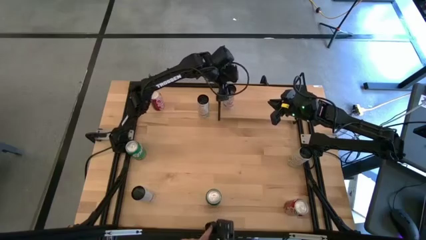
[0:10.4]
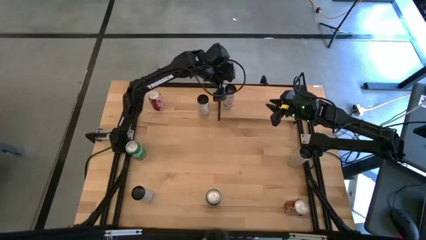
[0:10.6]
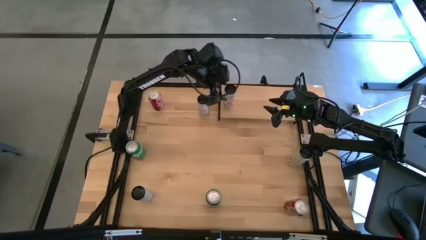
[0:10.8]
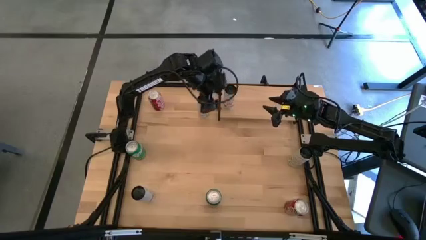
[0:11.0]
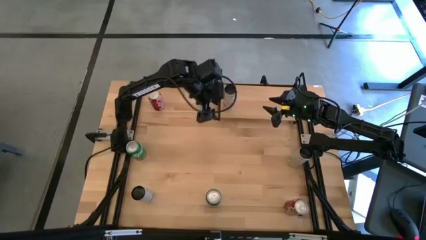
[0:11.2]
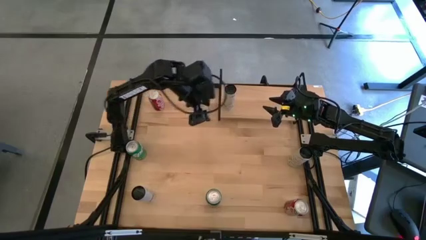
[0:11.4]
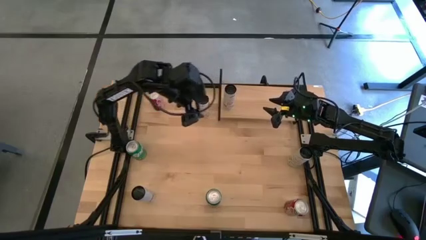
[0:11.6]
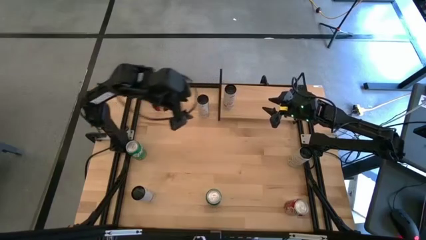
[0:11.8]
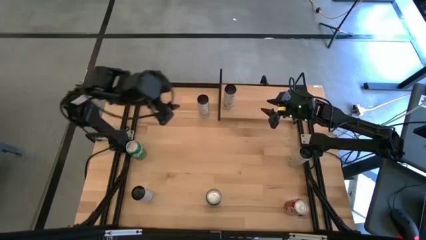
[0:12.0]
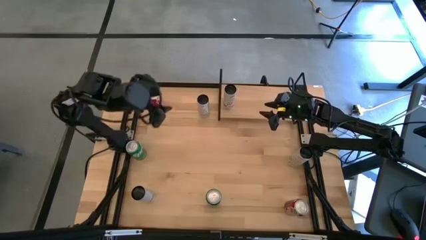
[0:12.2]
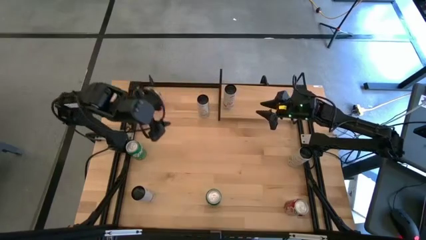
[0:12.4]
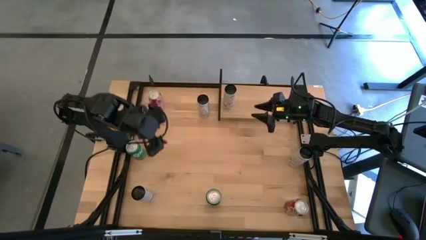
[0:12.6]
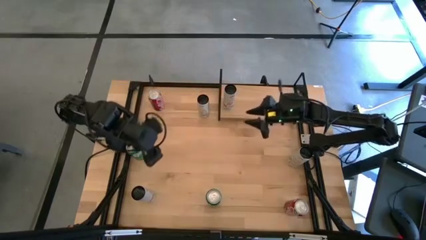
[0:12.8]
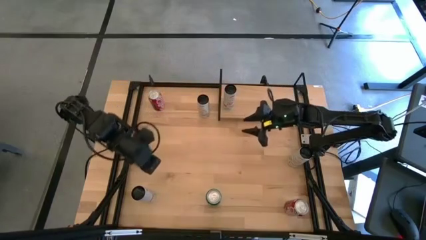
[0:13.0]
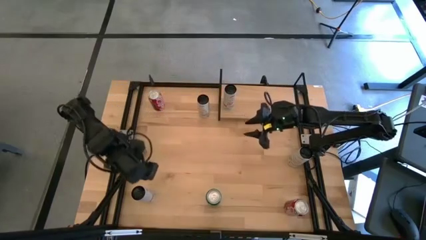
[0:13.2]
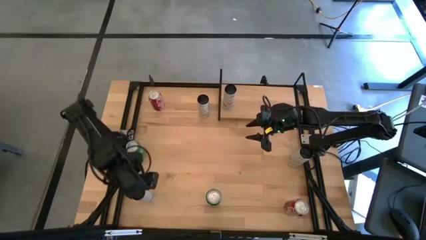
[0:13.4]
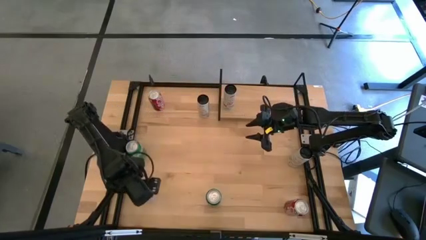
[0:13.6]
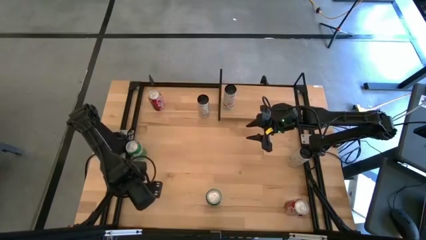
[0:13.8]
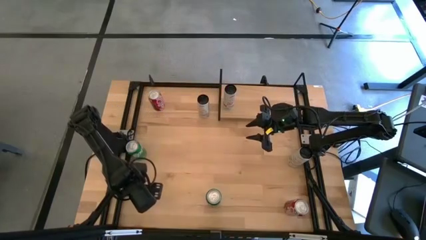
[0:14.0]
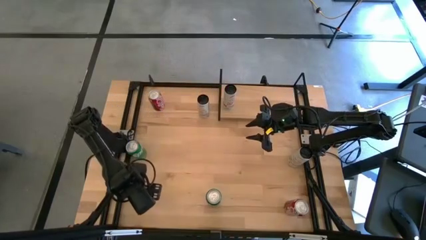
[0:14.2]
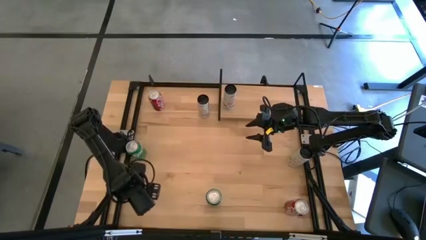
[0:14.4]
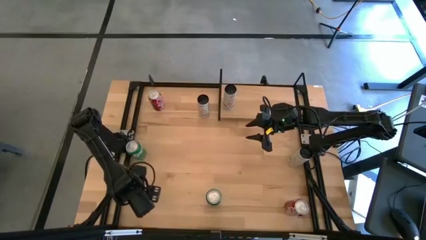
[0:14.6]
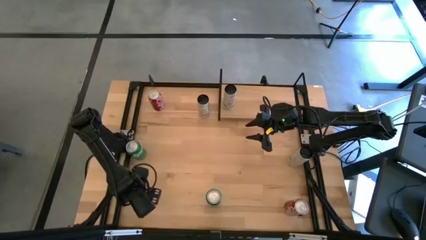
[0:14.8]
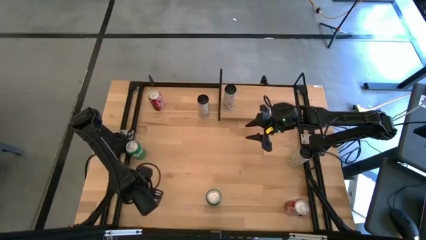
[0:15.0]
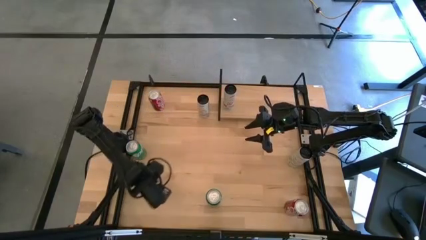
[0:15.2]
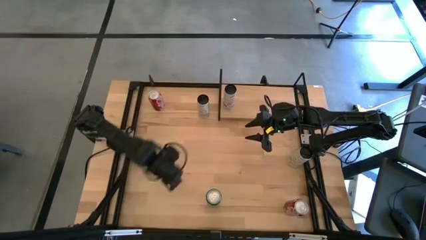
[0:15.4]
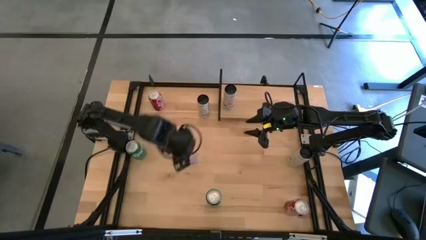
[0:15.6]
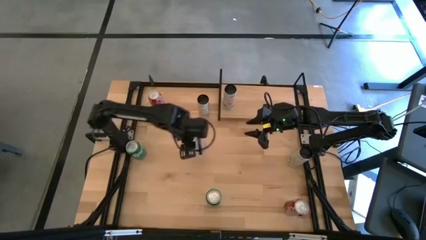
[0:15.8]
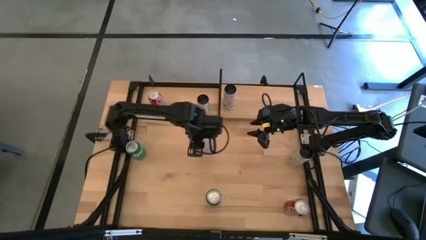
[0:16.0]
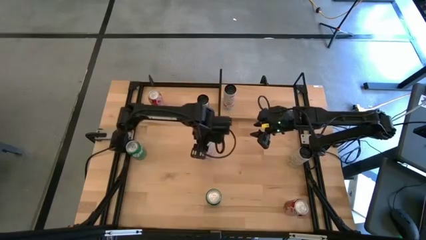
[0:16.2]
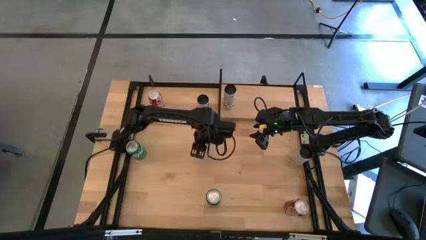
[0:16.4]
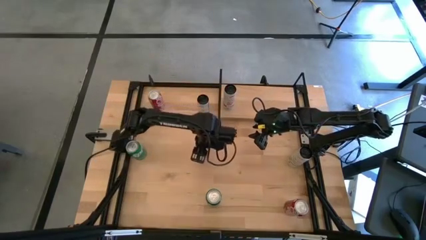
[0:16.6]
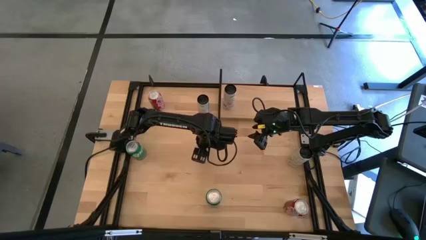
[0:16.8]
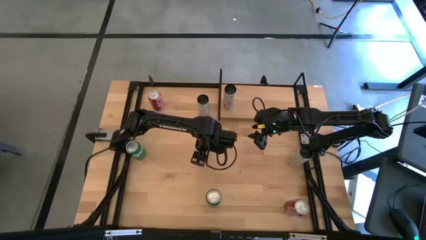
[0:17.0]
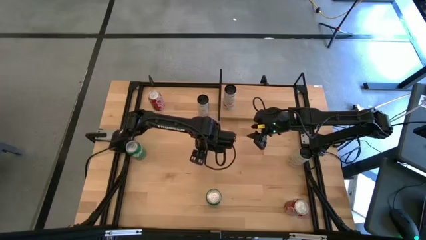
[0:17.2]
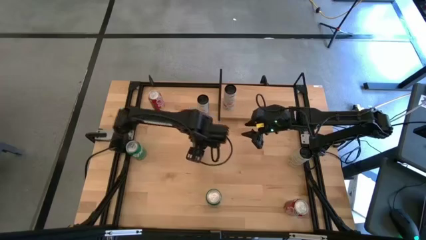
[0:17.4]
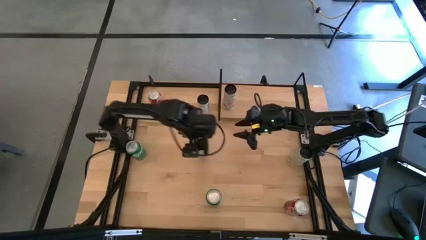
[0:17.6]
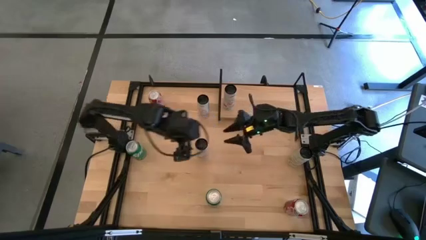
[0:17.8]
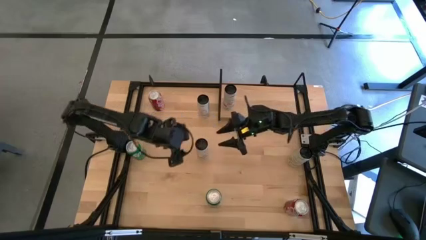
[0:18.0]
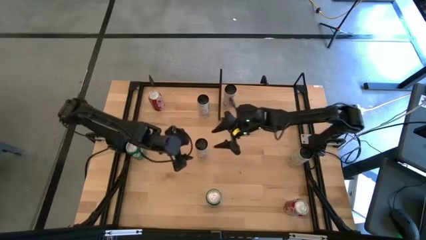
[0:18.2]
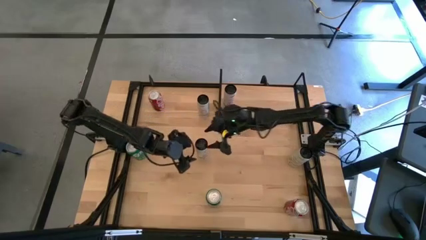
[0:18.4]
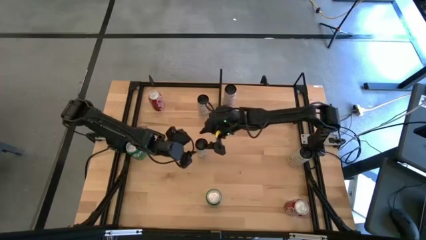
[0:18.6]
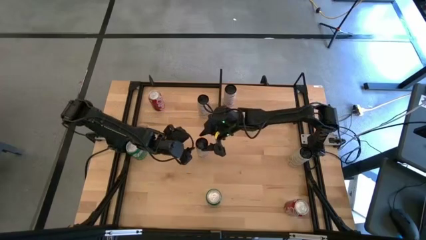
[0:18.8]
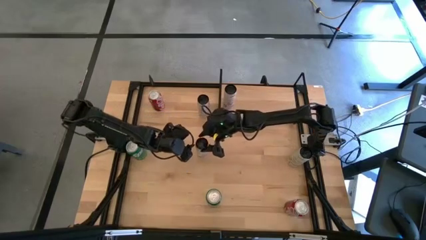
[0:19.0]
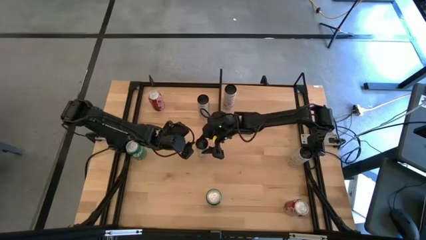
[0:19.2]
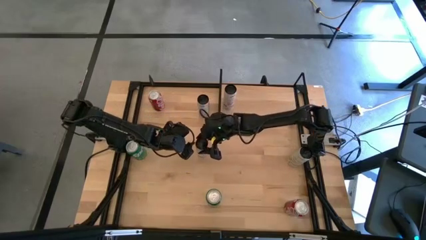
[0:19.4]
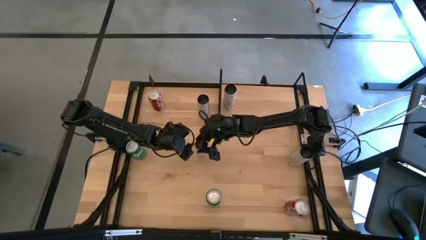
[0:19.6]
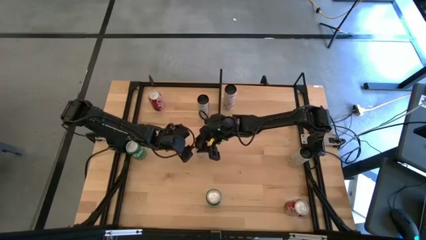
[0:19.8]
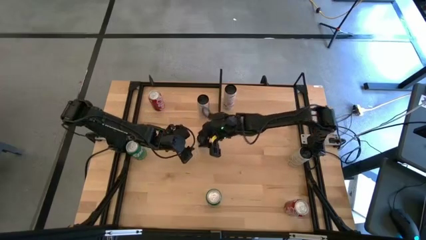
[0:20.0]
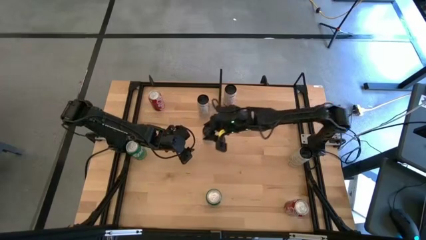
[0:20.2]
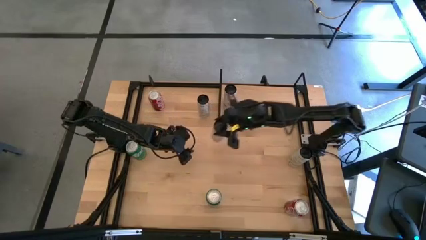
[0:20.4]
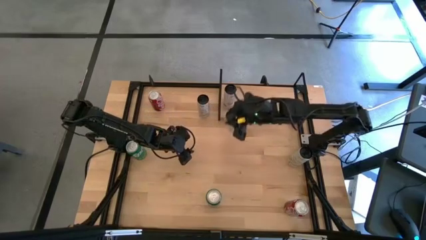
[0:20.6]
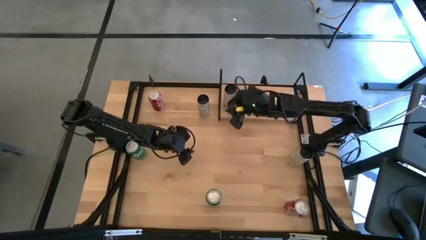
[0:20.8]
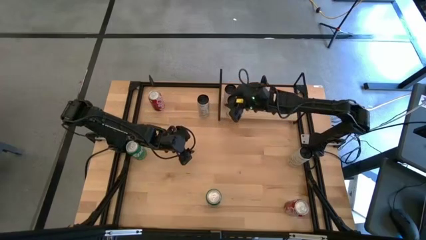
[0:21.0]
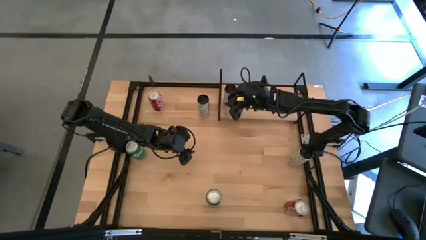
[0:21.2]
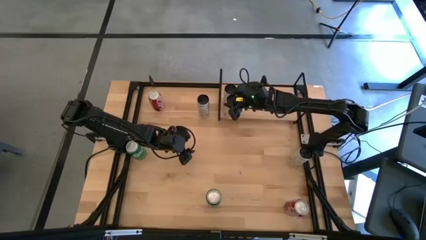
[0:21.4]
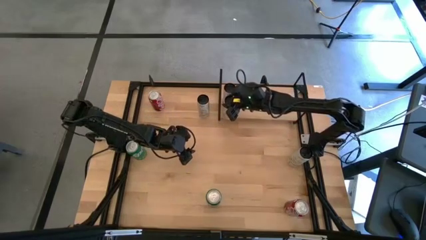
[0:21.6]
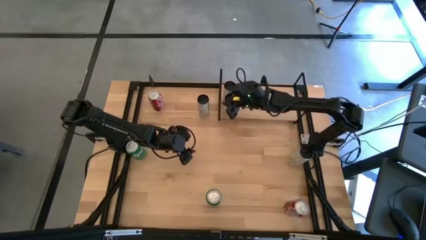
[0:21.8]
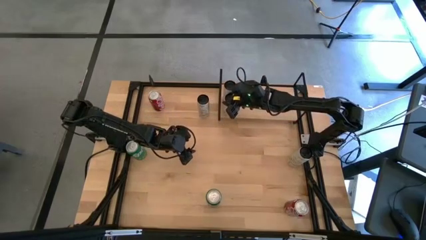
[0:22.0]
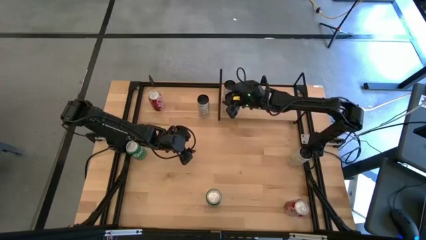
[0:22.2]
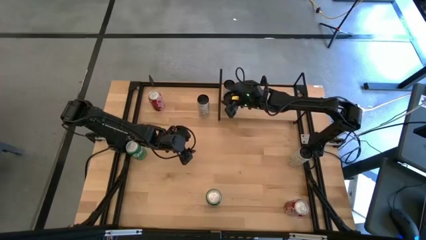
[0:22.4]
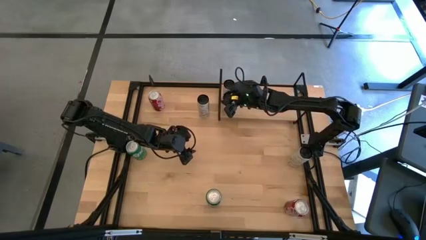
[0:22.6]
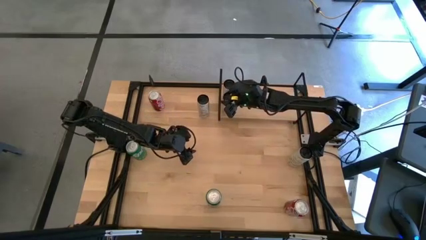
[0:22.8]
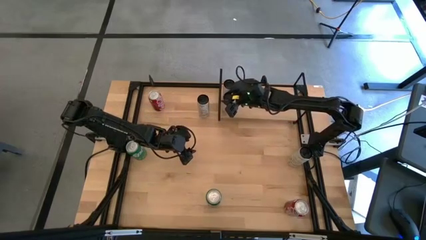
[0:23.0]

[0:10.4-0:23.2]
Task: Place canned beverage on shelf
Put the white-pink soda can on the shelf aligned with the other white-pink soda can

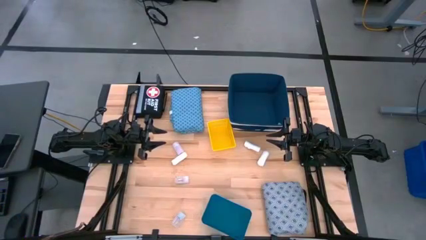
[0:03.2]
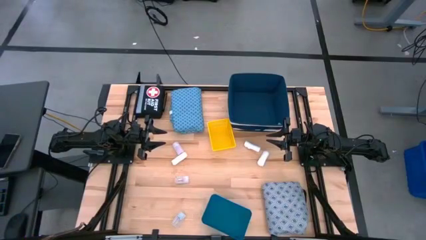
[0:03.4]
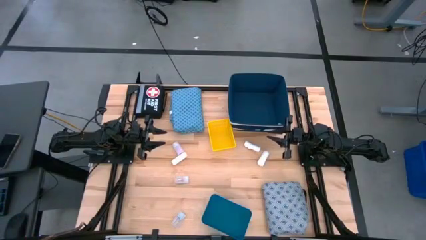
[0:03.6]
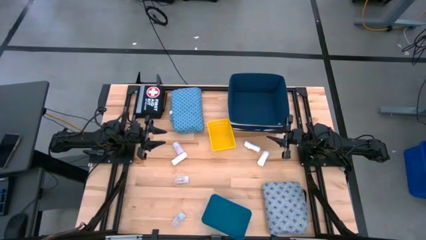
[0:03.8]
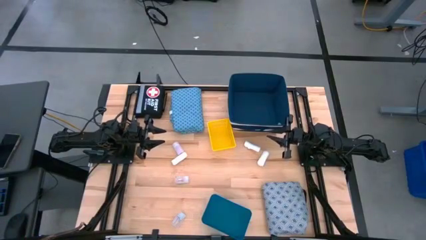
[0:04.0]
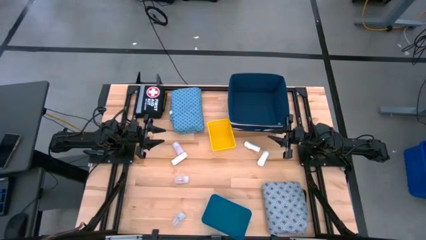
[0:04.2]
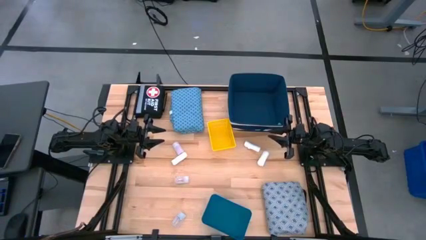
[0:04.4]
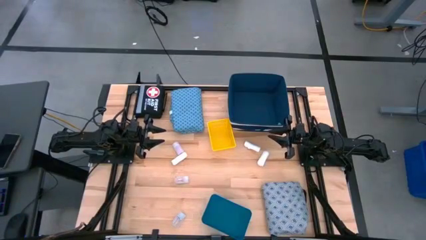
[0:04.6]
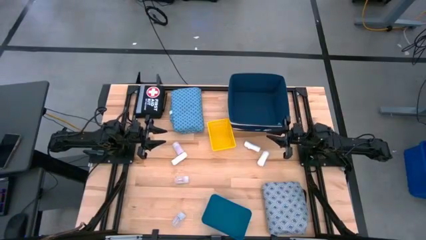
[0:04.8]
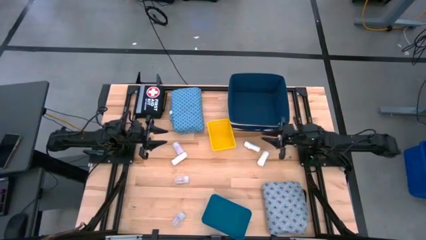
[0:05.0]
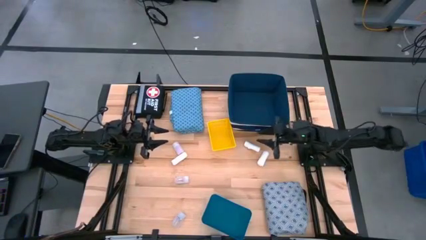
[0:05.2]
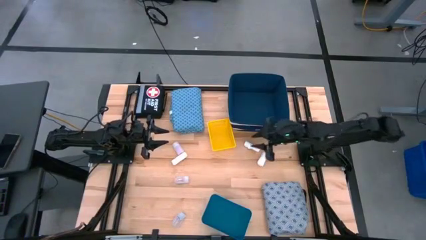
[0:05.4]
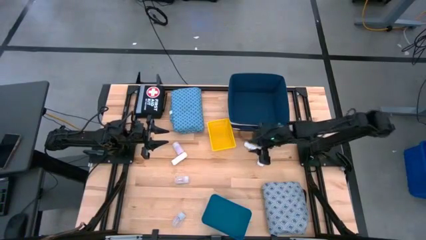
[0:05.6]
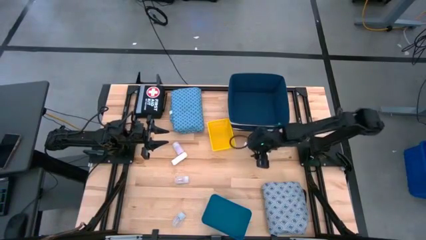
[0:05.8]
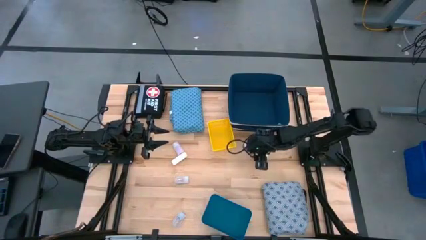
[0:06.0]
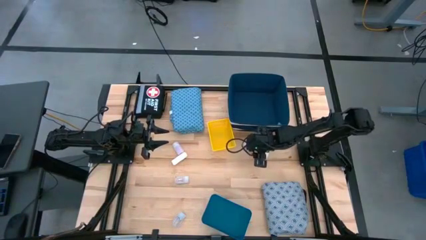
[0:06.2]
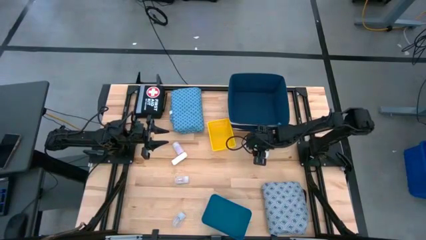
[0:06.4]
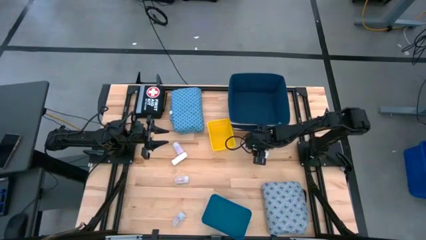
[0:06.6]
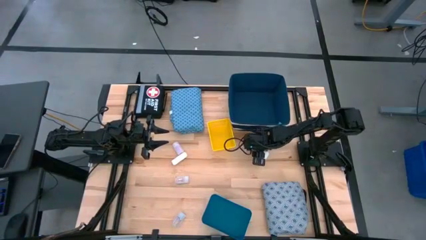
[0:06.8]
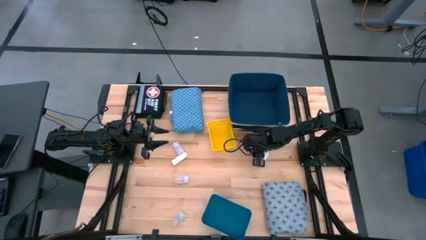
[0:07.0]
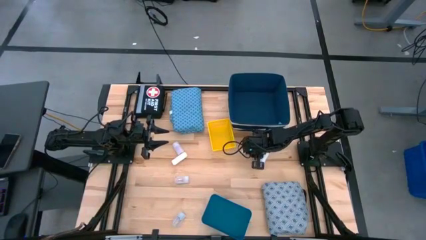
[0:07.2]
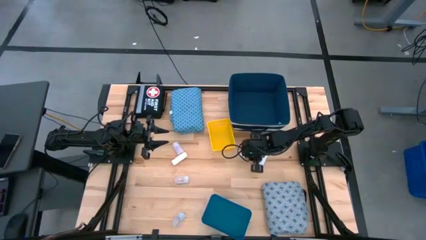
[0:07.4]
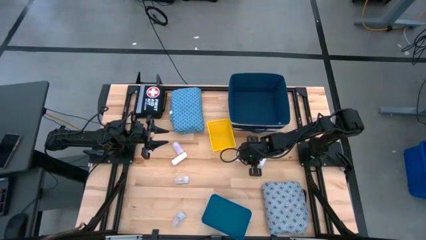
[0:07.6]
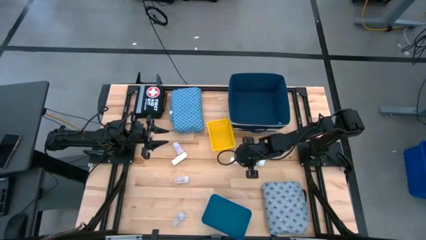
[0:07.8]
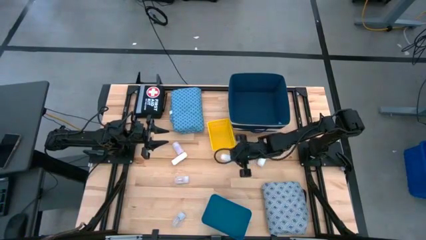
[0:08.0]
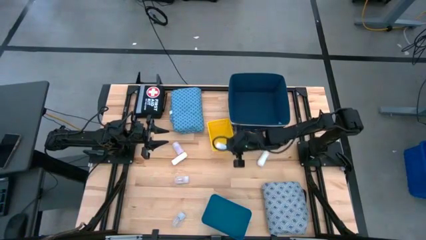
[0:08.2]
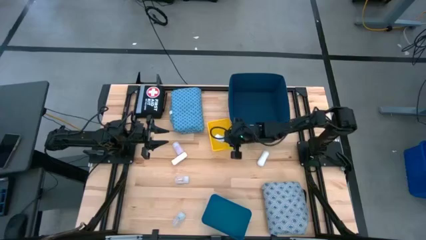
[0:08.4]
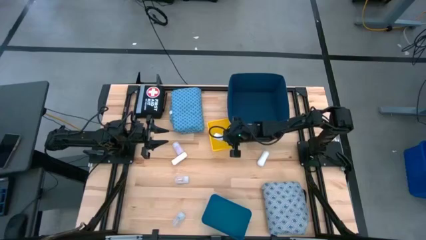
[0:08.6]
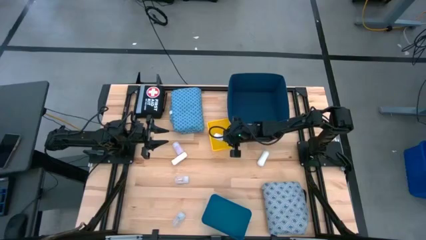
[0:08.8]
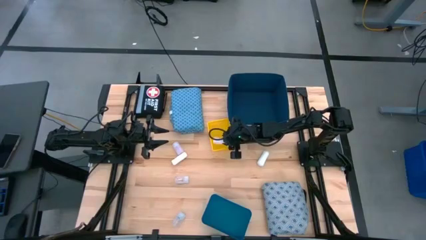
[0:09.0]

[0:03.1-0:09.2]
Task: Pick & place medical supplies in basket/bin
Put the top right white bandage into the yellow basket
